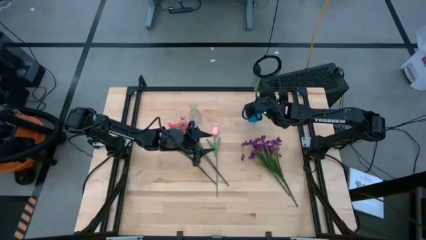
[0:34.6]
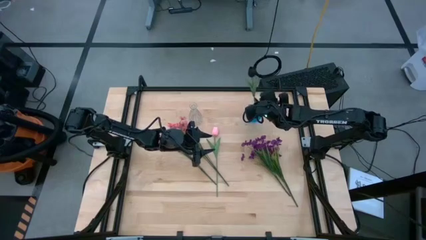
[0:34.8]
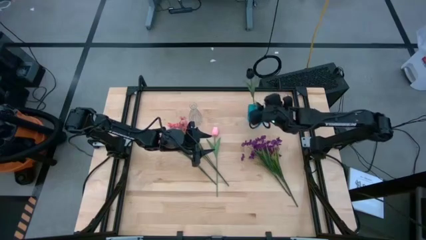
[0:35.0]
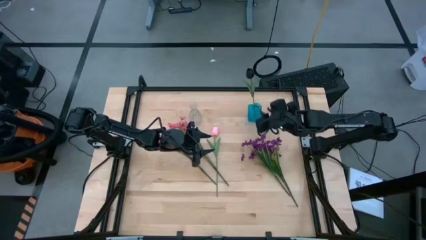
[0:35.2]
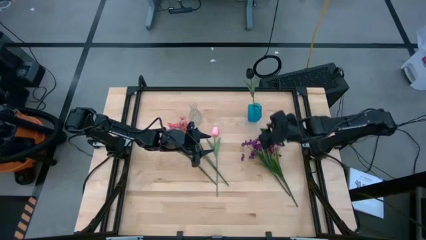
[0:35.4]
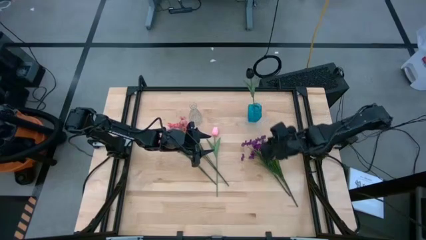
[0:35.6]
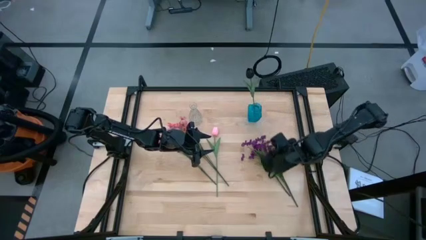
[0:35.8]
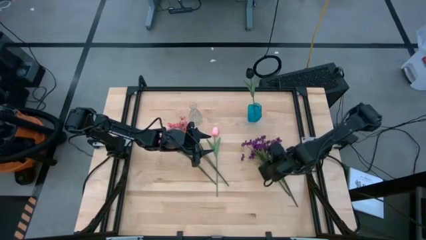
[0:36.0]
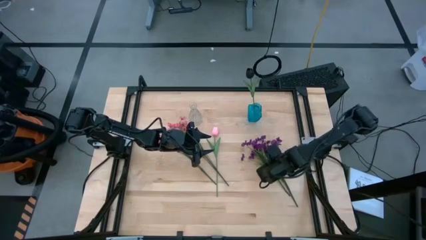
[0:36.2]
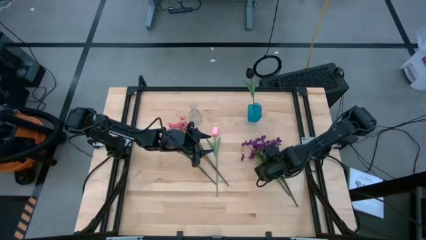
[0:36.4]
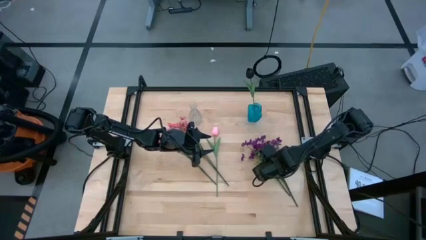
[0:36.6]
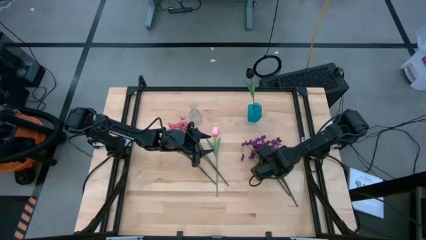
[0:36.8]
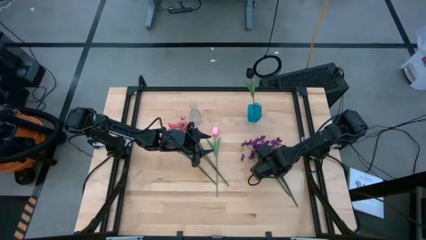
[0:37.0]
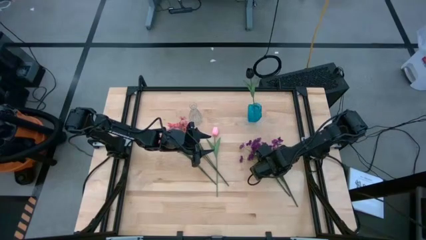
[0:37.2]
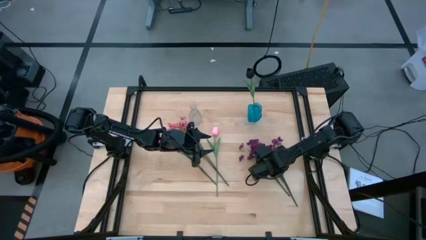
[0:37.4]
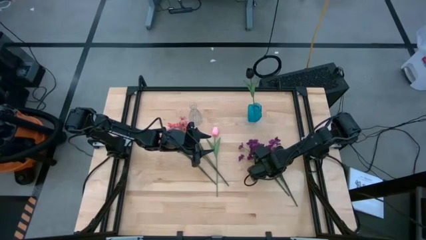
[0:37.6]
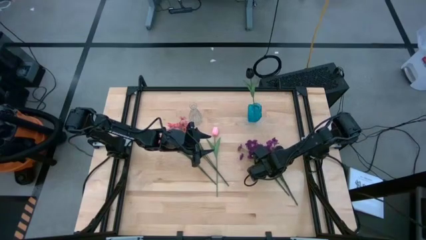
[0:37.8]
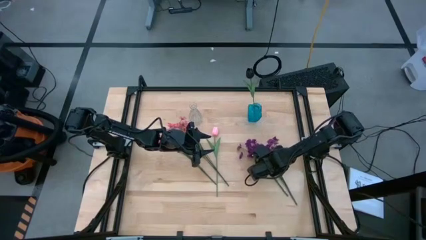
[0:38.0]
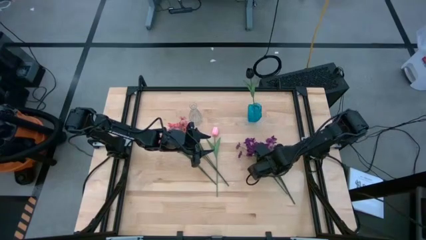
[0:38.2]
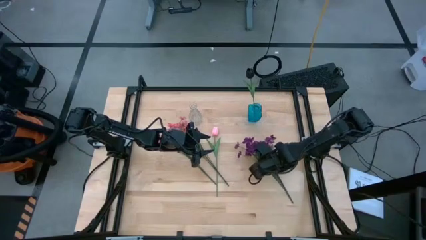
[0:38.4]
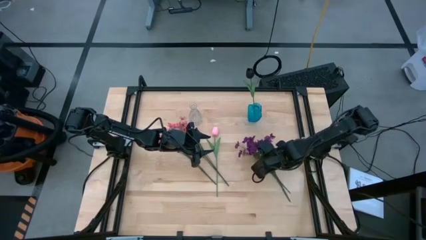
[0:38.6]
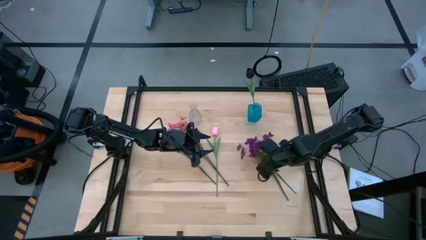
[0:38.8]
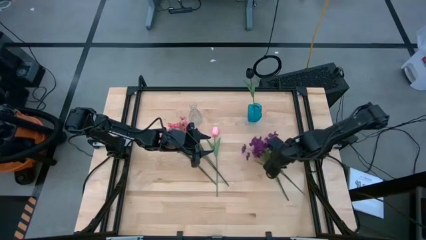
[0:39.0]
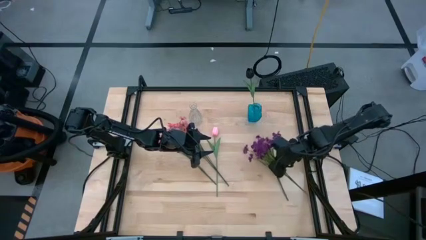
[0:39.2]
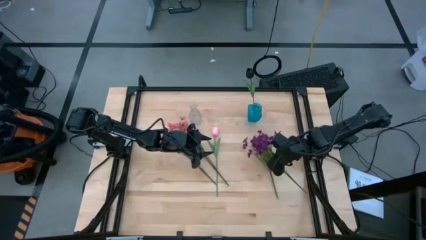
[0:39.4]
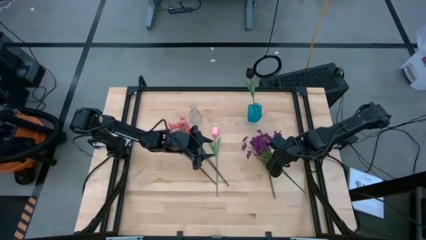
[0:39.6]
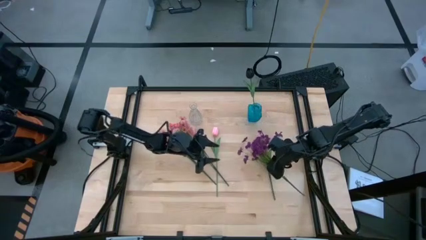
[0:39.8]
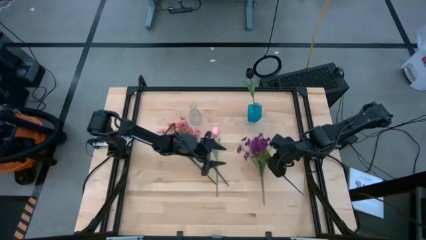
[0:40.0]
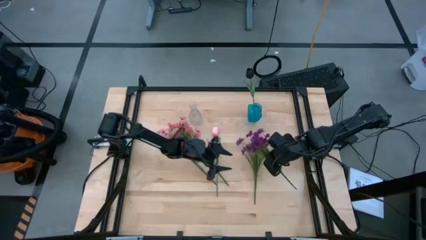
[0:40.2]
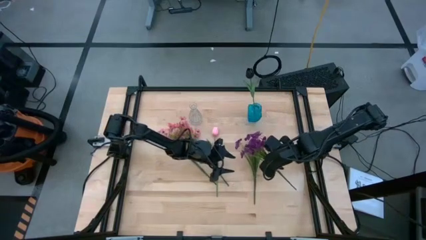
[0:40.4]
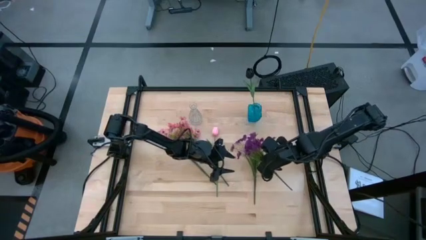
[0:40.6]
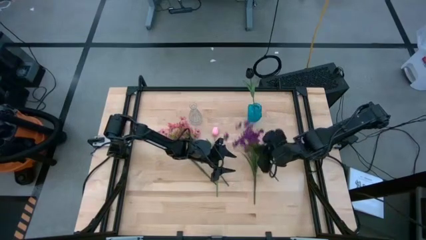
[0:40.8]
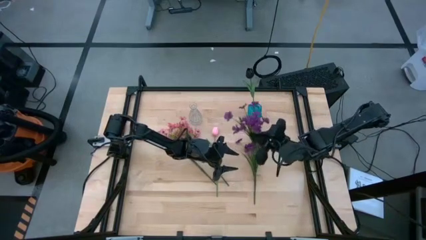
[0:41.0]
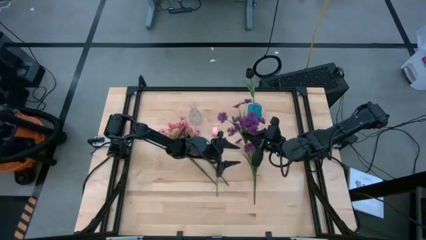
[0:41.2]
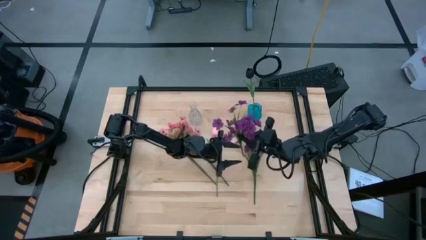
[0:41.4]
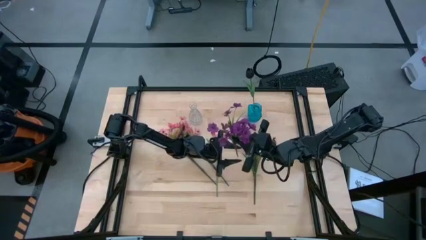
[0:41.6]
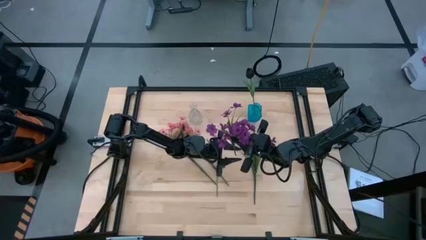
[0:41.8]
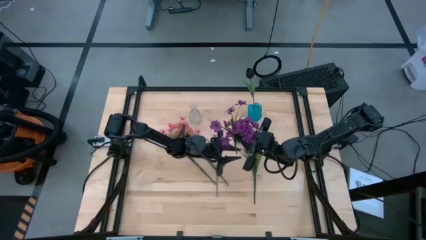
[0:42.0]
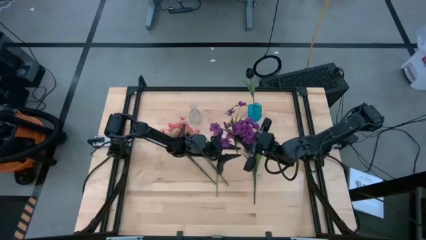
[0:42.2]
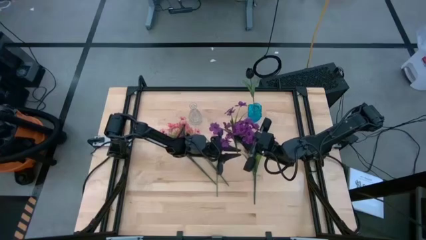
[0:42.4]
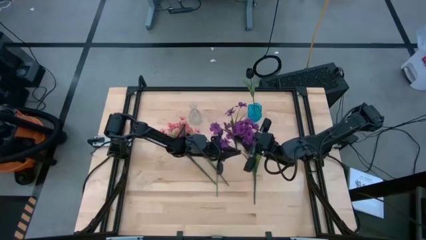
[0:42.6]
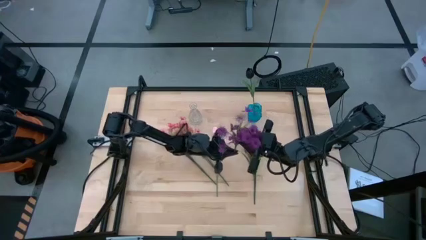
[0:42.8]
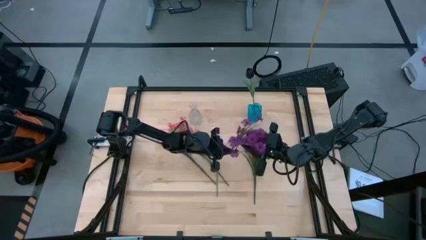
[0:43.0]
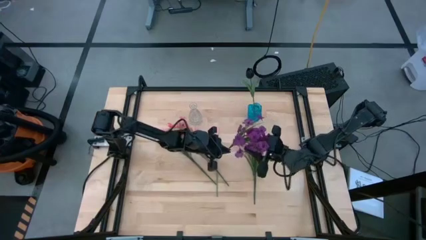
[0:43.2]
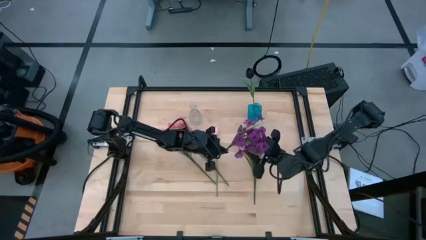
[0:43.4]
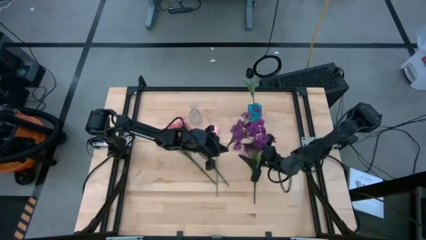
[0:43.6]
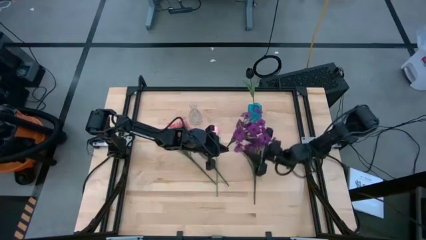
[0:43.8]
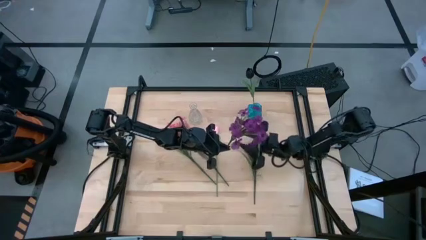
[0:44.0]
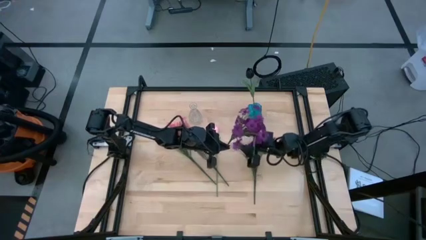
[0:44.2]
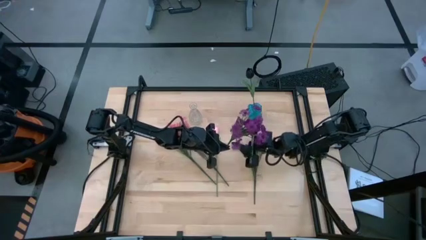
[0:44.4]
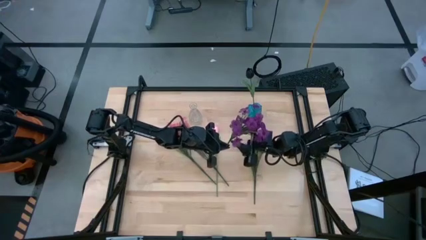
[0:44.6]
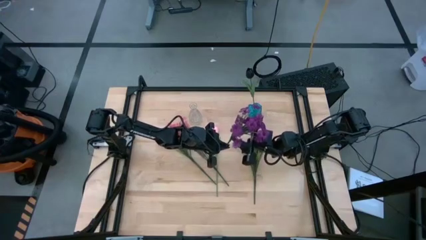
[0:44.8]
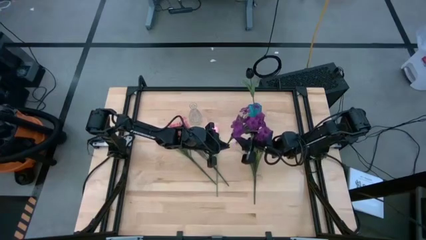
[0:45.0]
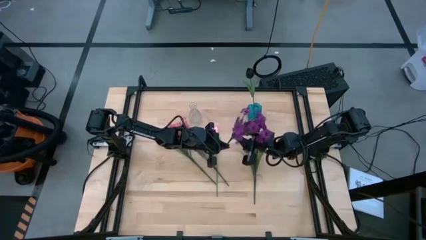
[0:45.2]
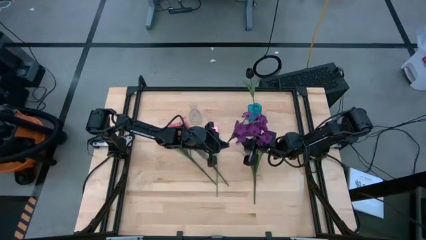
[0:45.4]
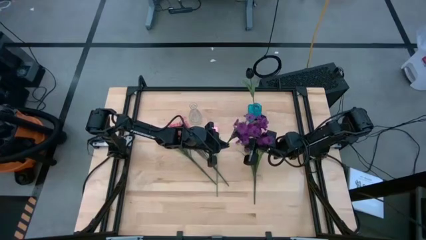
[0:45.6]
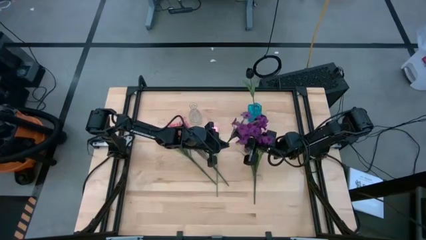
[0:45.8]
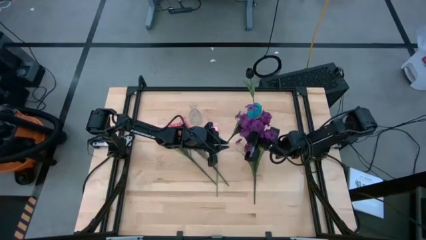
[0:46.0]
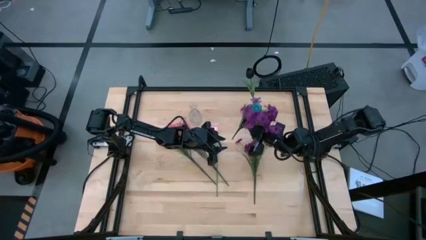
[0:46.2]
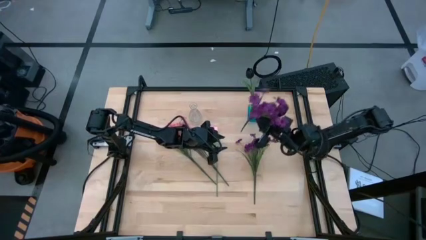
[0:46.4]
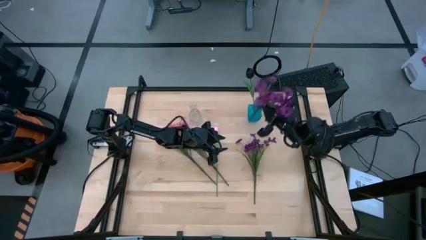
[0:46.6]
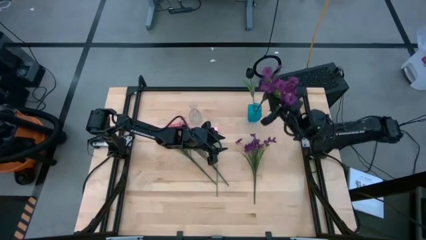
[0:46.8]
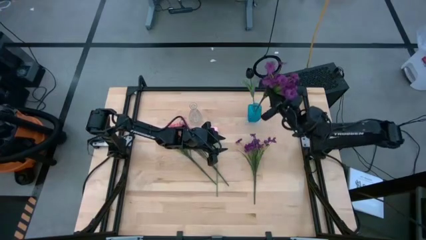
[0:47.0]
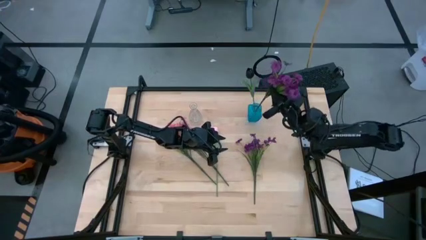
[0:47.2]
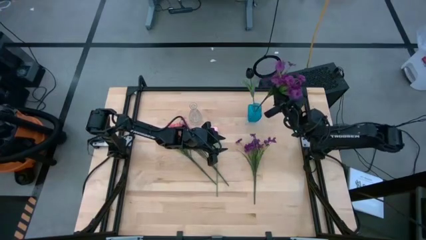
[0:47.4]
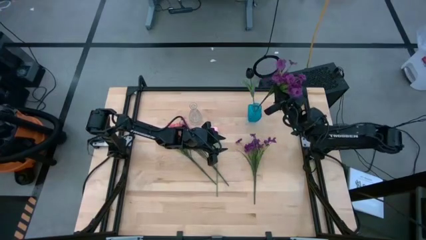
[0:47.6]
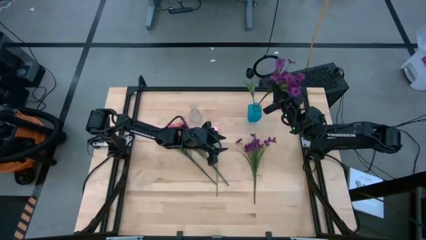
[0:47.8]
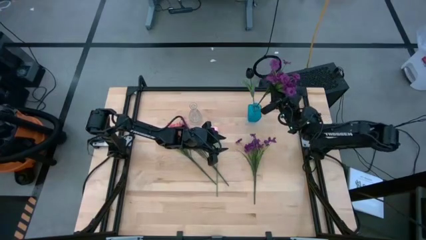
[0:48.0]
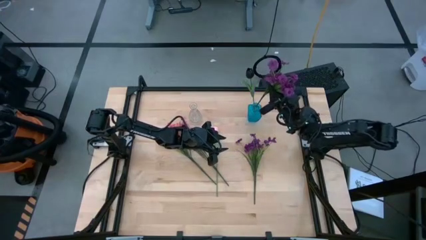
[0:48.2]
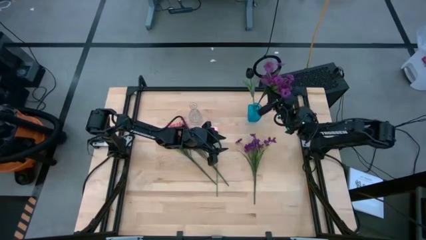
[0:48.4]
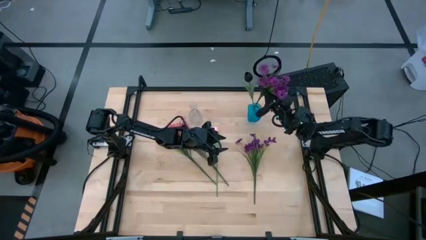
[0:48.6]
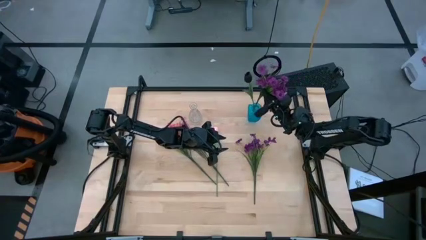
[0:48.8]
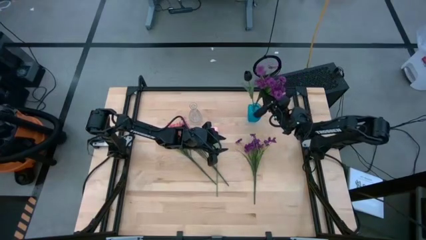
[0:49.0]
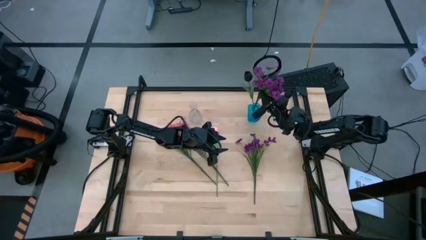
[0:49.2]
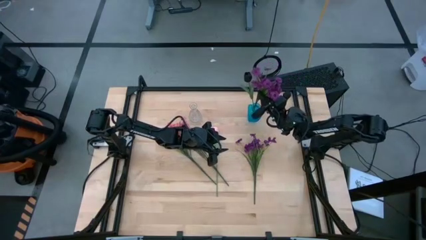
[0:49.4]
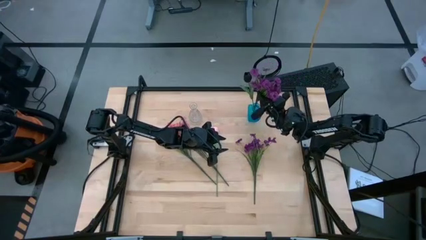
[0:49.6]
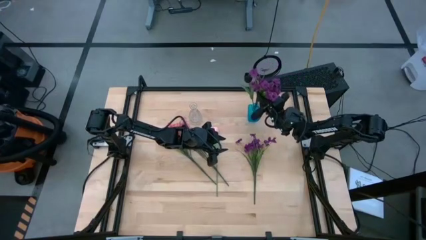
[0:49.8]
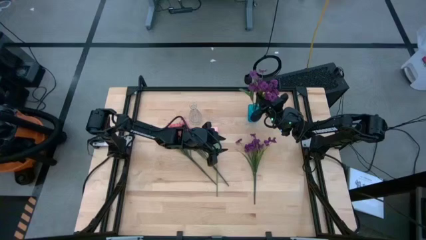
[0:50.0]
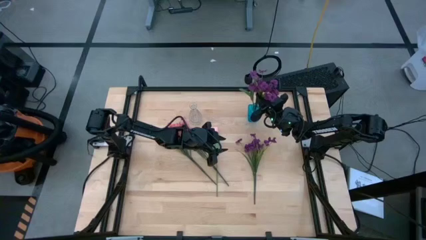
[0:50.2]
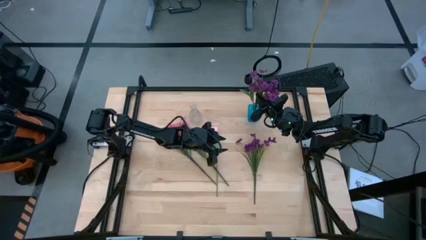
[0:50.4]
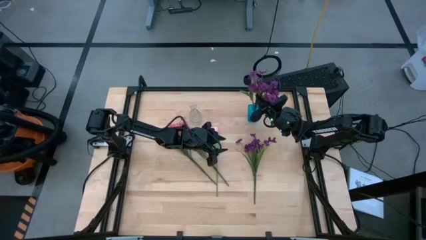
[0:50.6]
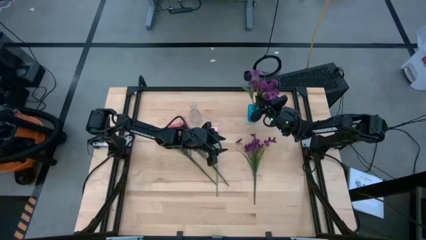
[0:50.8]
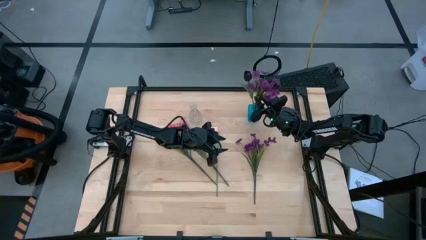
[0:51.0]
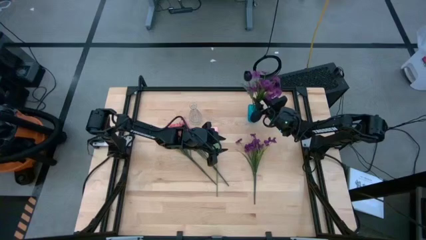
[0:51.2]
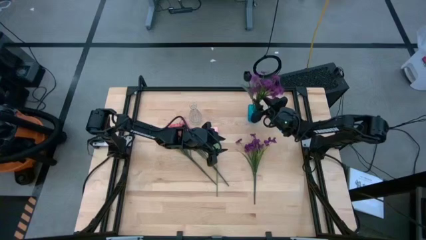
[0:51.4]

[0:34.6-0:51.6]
Task: Sort flowers into vase by color
Put the left purple flower into the blue vase
